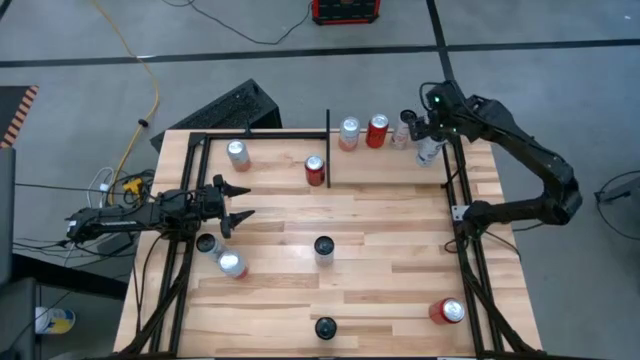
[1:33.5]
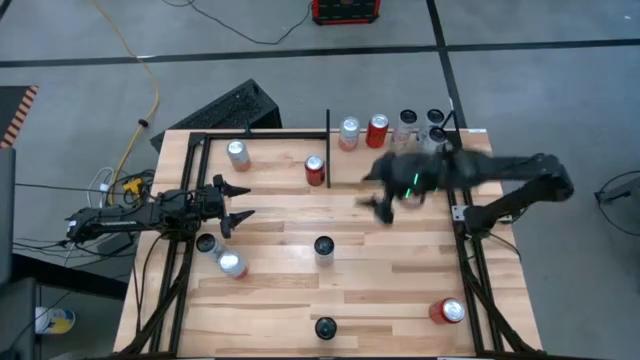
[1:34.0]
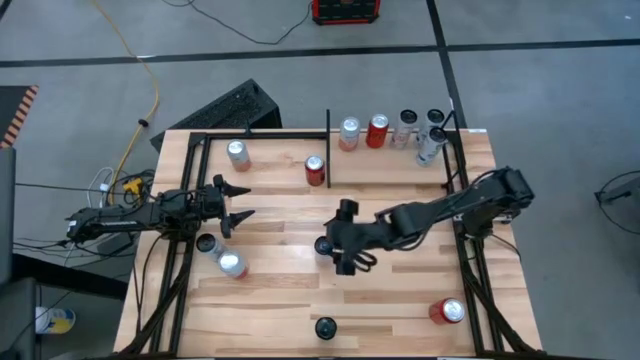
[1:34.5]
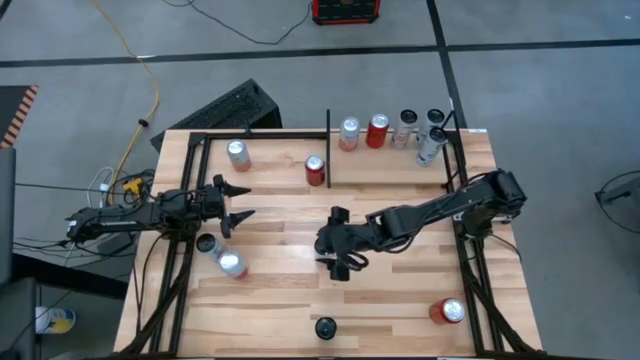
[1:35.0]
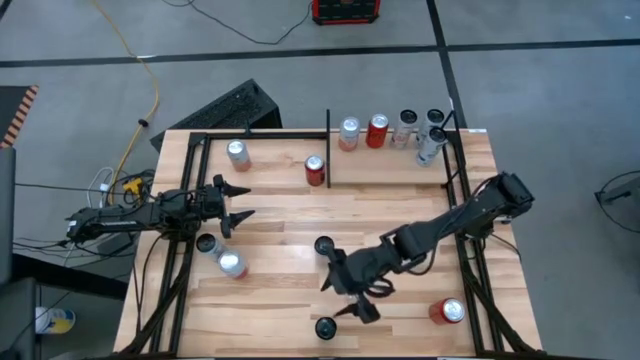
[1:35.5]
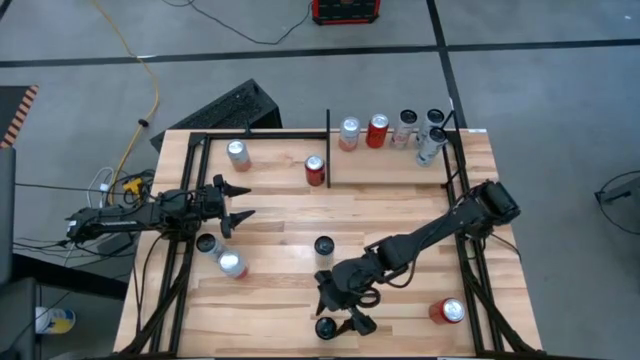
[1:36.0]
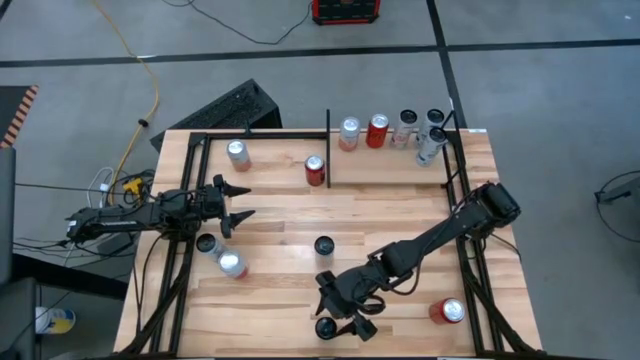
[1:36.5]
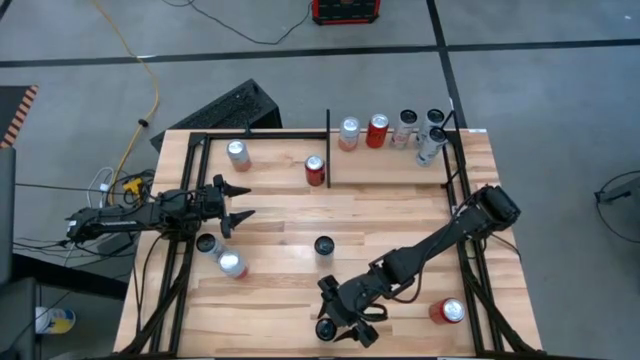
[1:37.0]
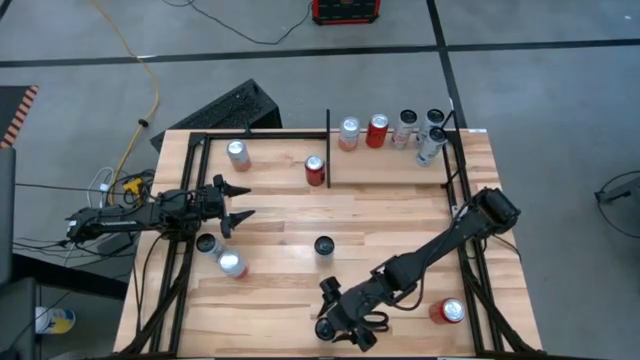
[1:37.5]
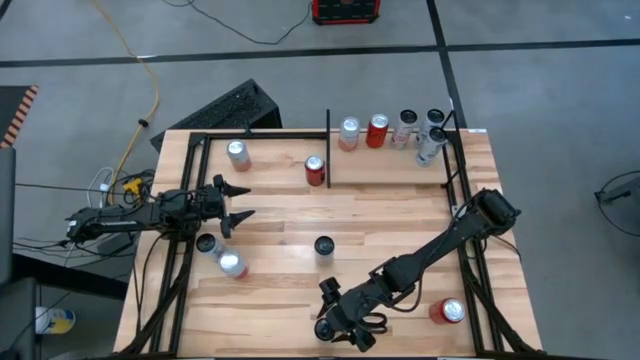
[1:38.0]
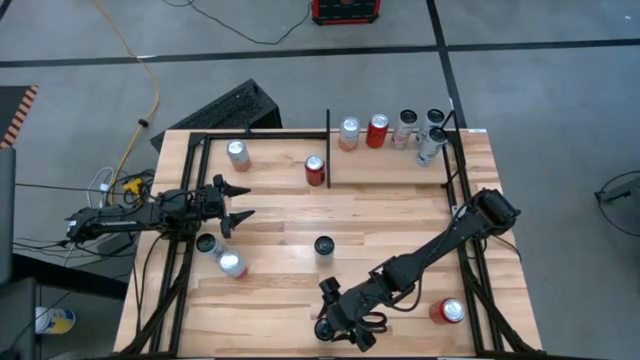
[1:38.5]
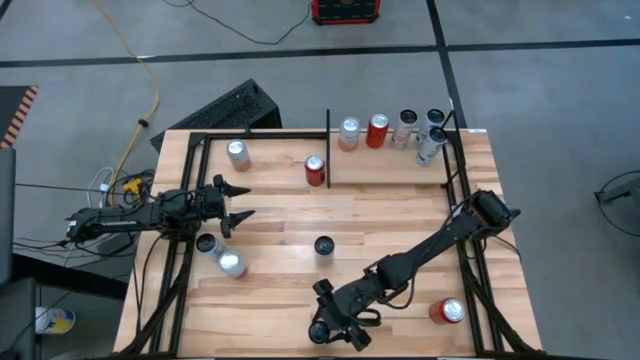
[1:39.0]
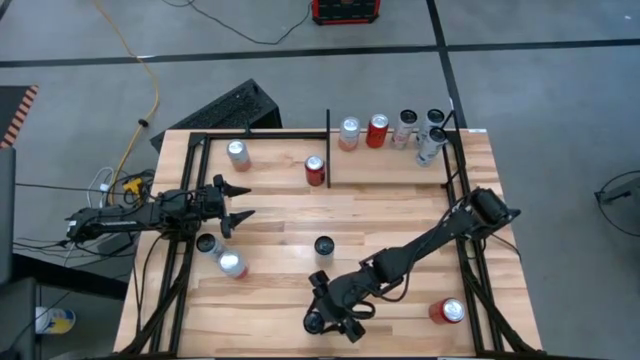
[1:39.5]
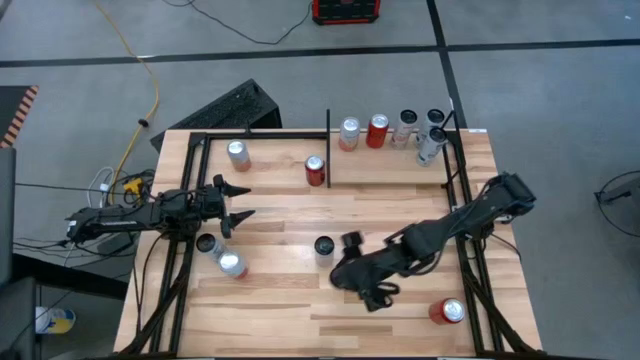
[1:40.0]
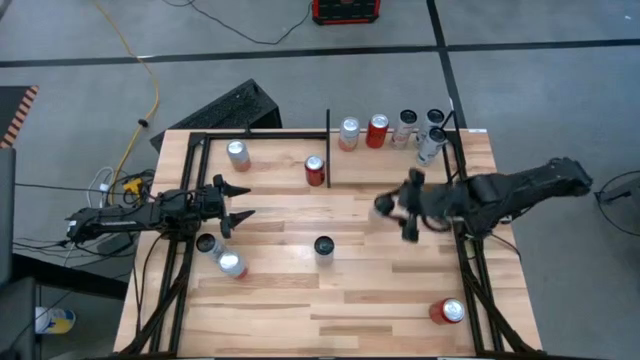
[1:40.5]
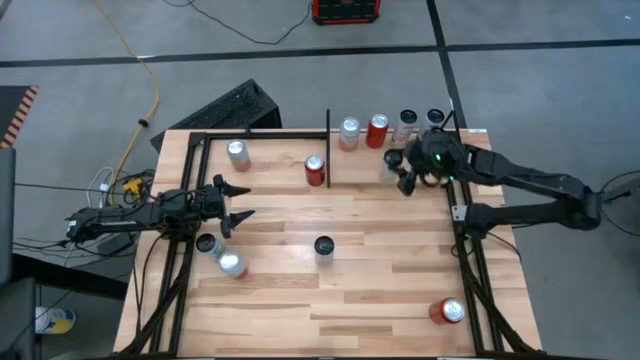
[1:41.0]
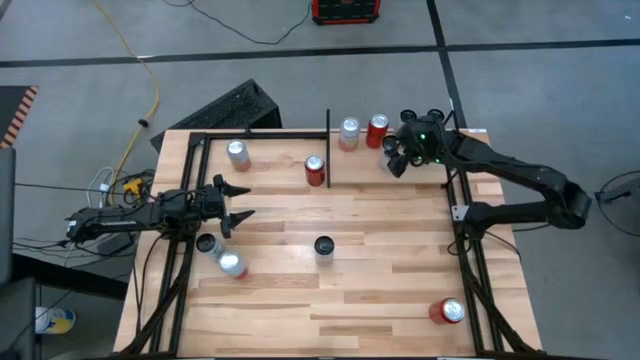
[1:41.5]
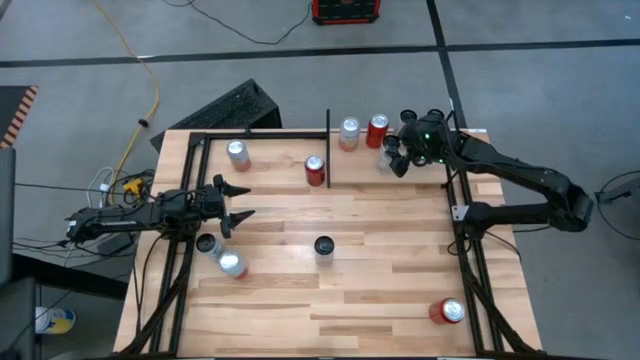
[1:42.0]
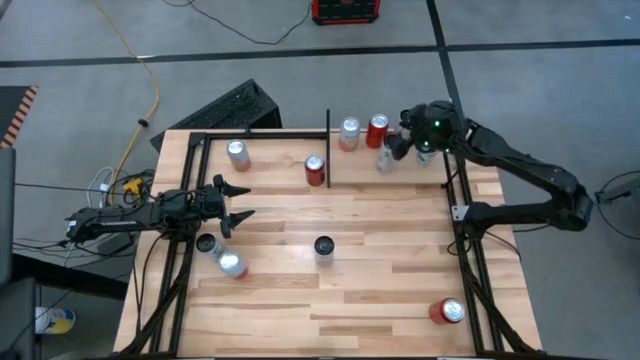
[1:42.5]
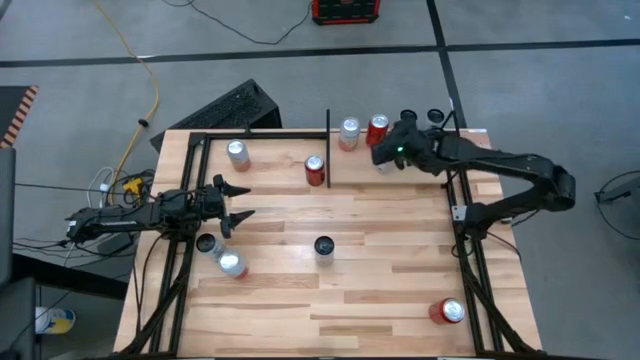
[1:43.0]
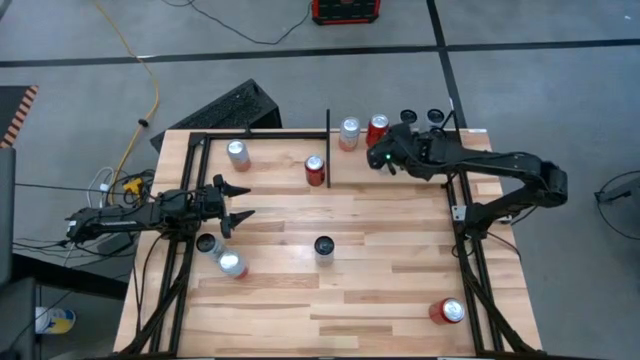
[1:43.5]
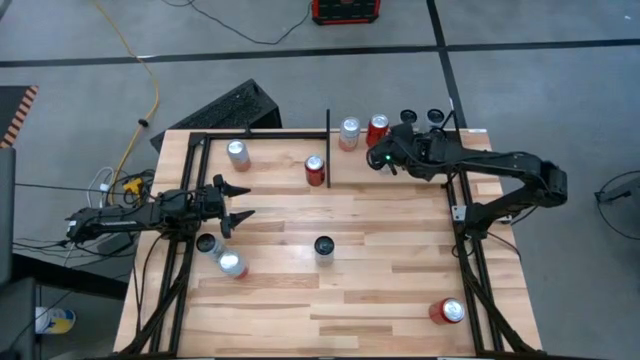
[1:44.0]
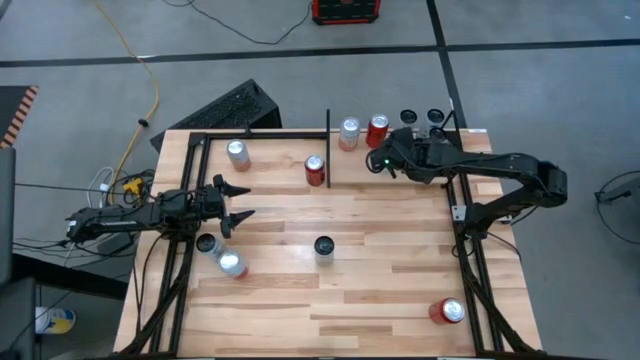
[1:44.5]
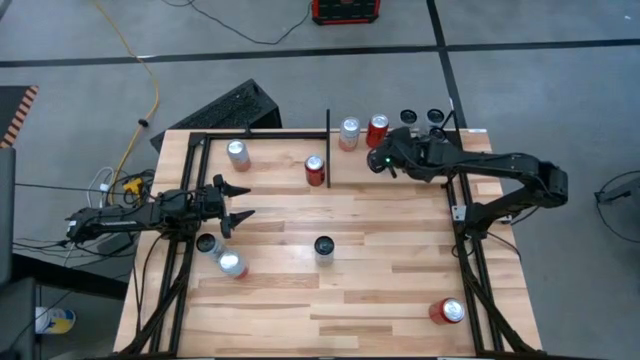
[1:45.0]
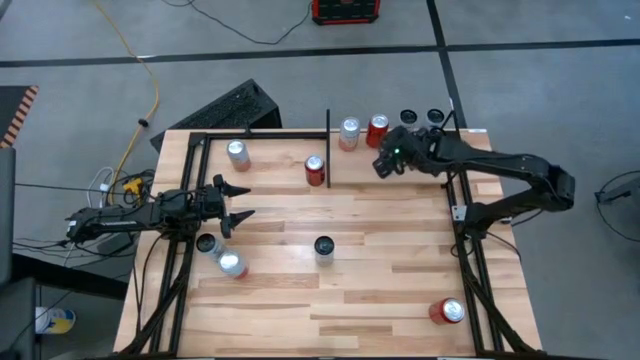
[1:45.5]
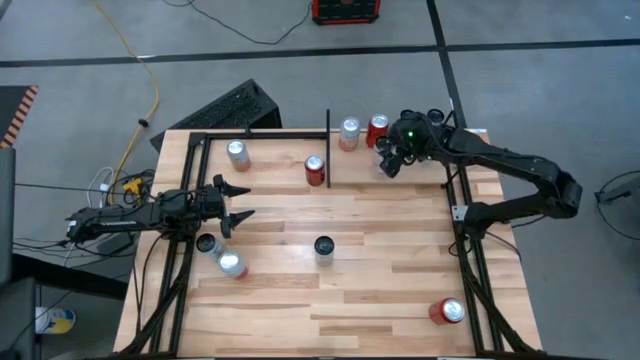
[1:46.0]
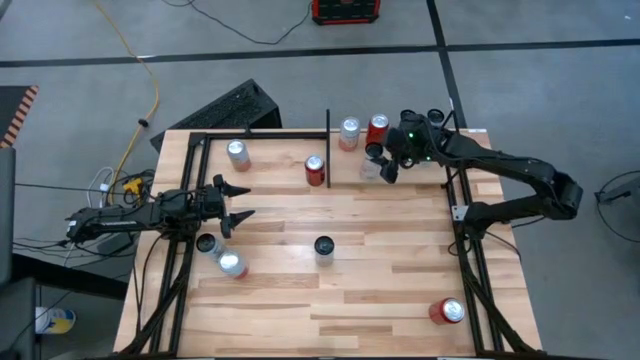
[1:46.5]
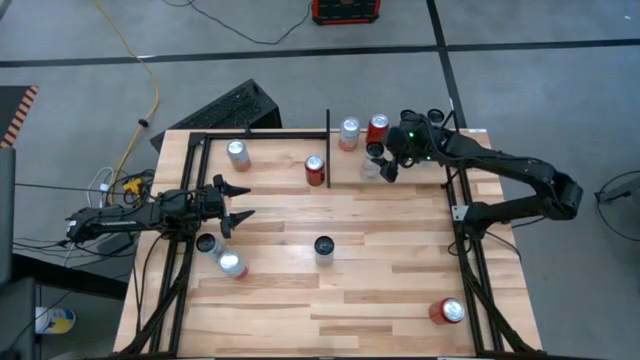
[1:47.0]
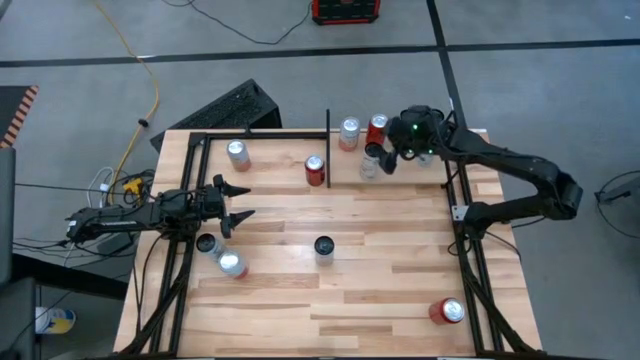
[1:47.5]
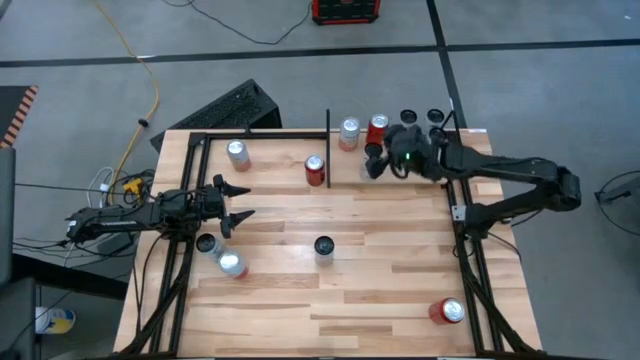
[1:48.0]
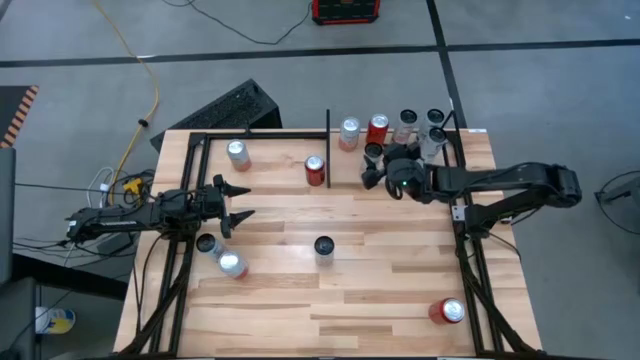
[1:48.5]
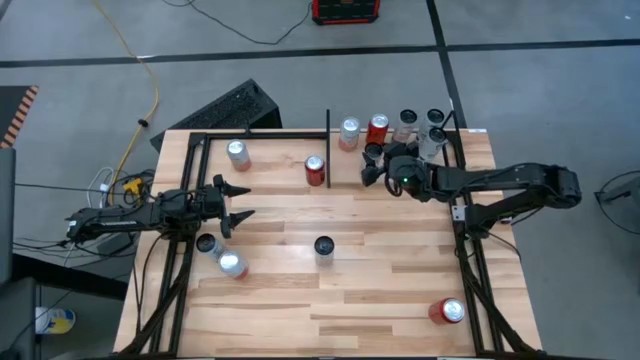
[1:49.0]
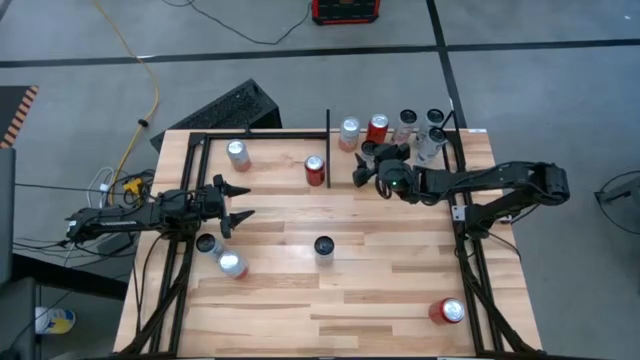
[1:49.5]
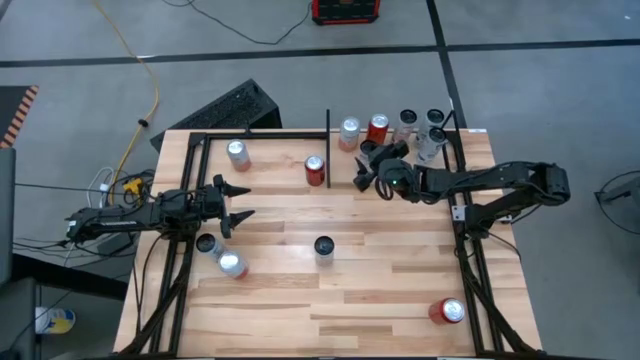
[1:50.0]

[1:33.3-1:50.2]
Task: Place canned beverage on shelf
Put the black pink soda can on the shelf

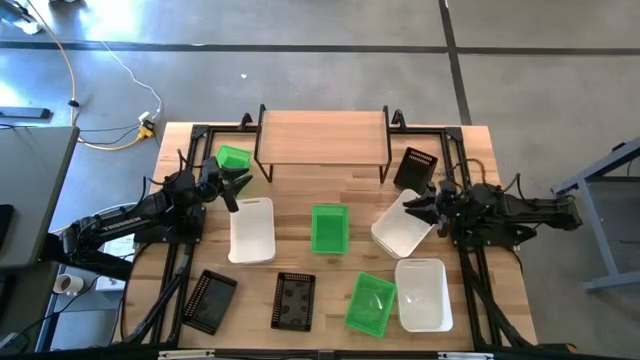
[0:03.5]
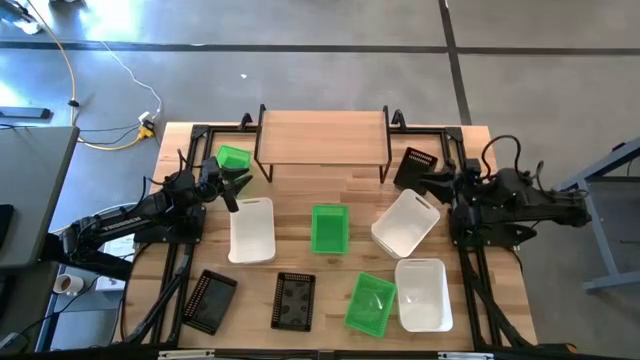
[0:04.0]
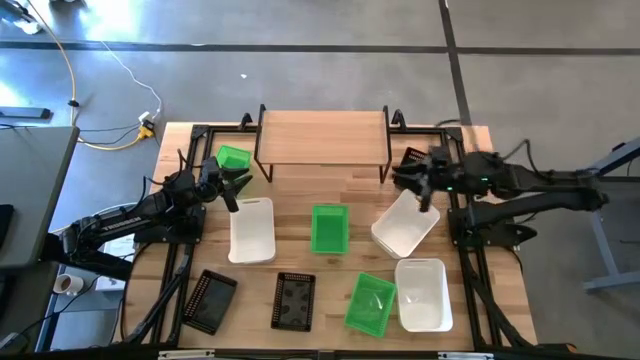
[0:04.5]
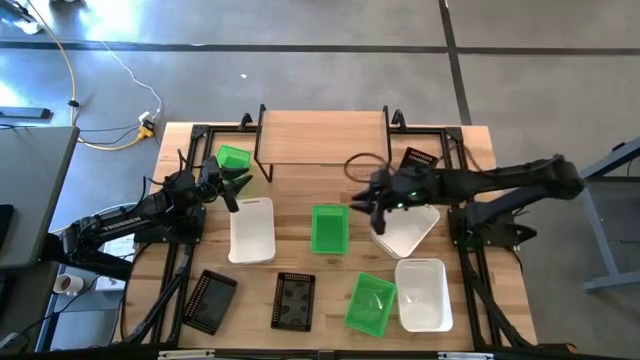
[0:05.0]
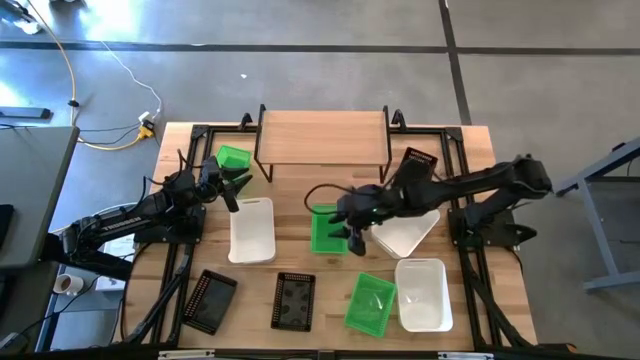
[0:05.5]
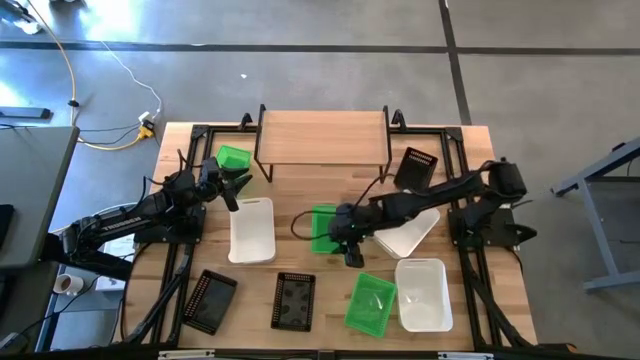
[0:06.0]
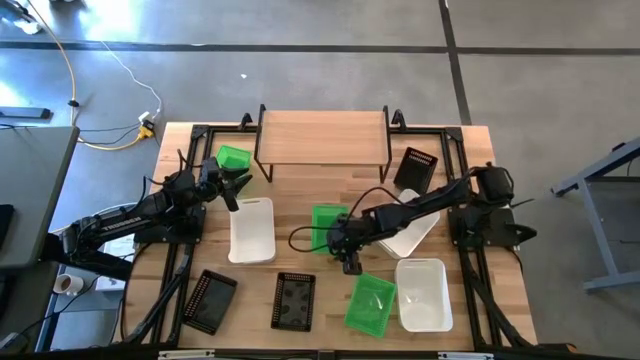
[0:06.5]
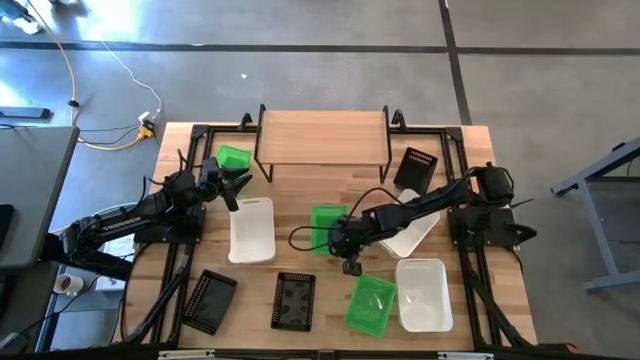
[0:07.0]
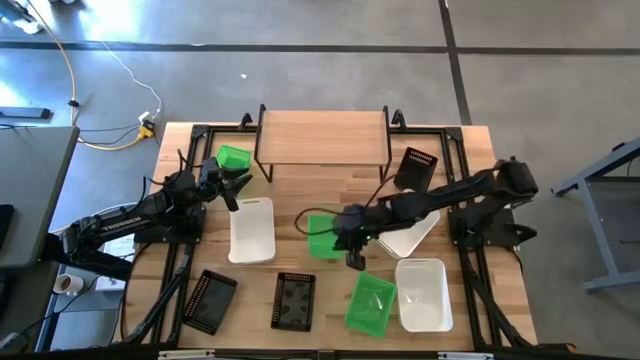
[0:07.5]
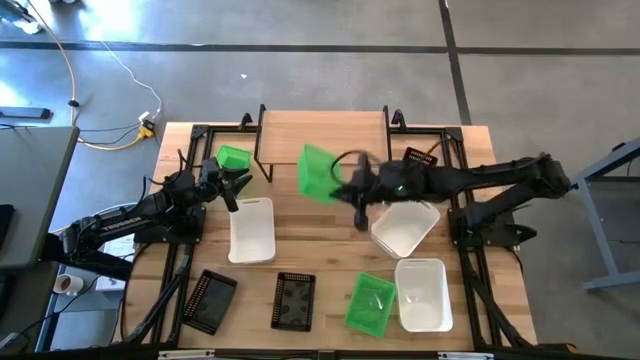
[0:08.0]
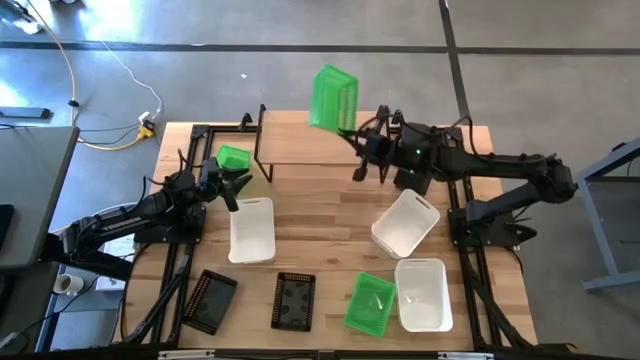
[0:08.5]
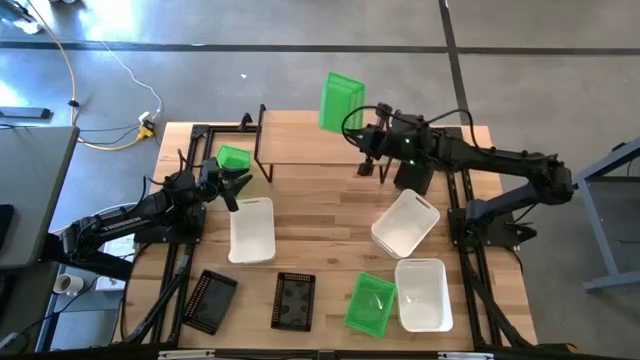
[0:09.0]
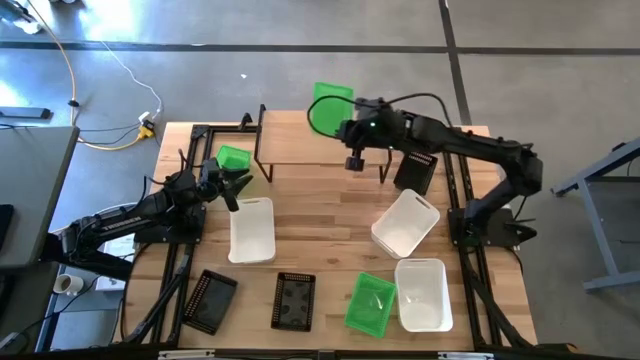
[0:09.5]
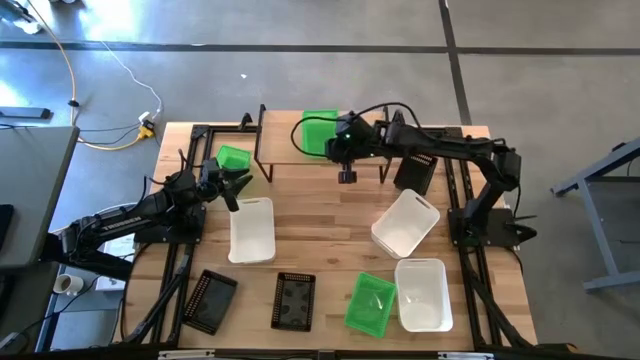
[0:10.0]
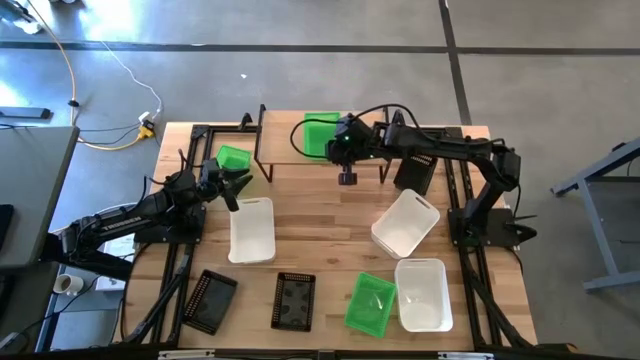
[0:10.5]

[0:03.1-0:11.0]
Task: Stack baskets on shelf by color
Put the center green bin on the shelf
